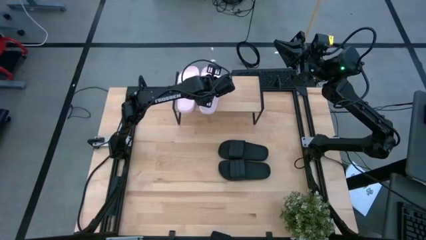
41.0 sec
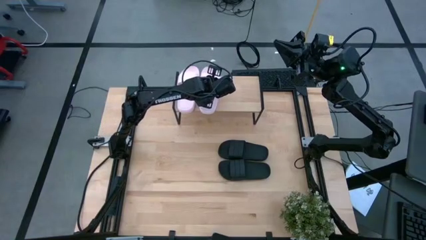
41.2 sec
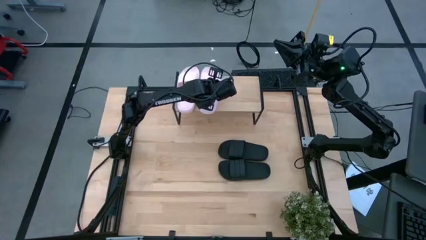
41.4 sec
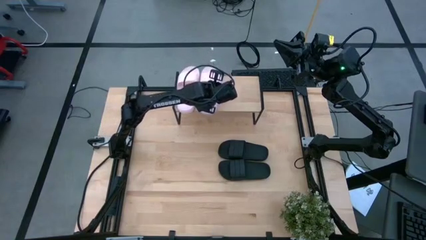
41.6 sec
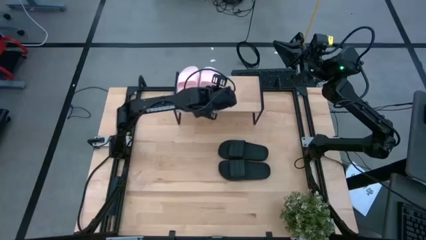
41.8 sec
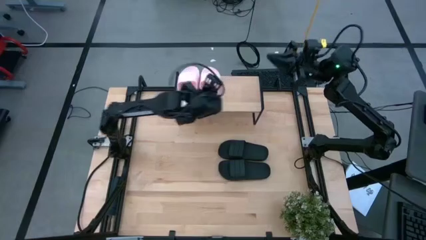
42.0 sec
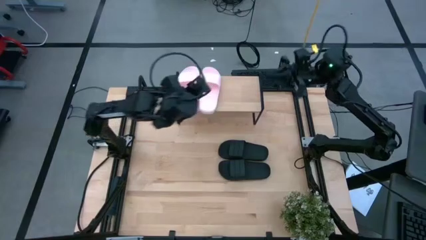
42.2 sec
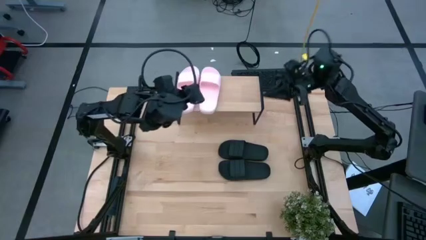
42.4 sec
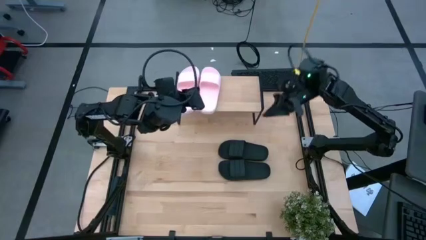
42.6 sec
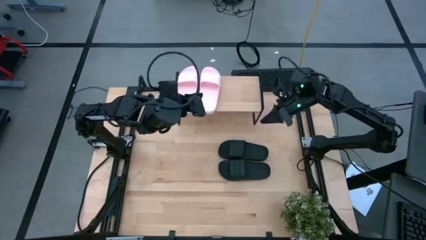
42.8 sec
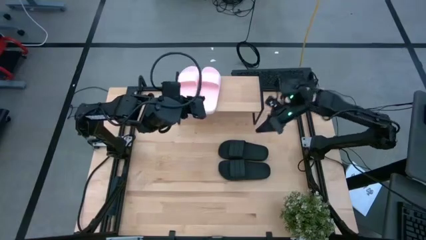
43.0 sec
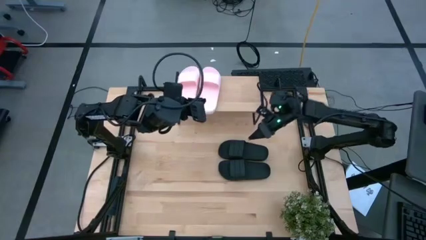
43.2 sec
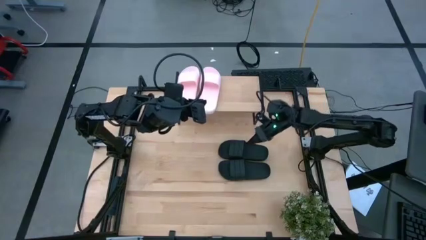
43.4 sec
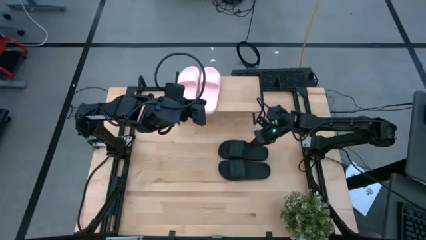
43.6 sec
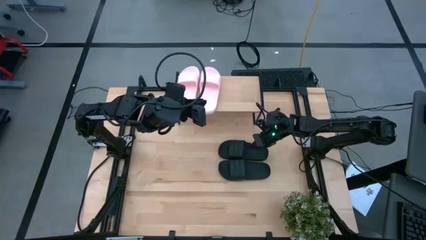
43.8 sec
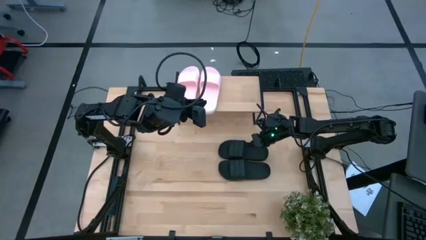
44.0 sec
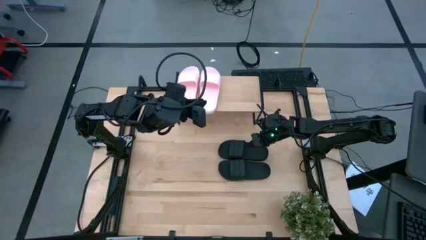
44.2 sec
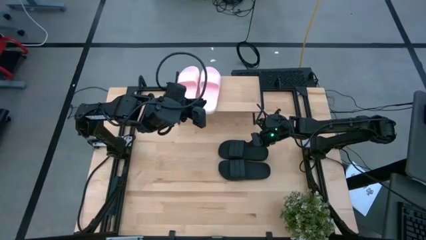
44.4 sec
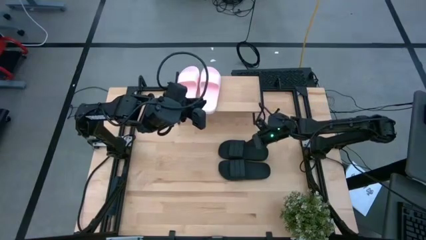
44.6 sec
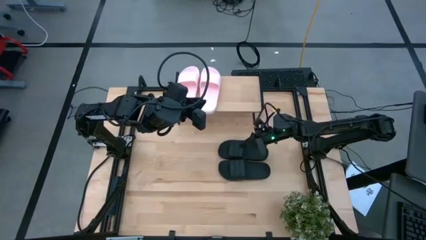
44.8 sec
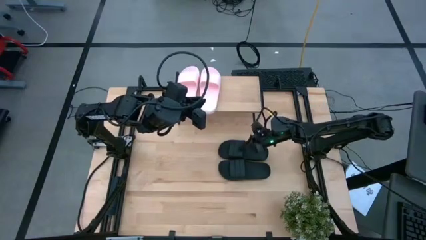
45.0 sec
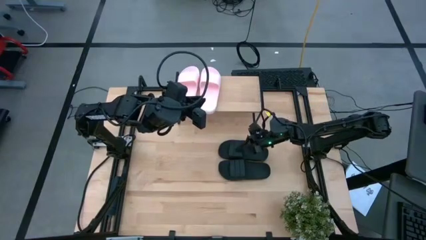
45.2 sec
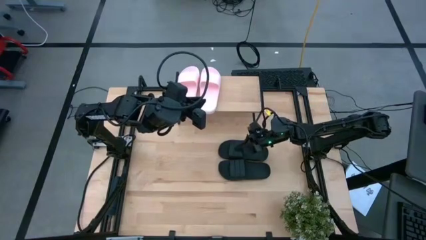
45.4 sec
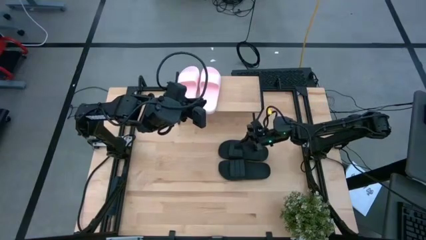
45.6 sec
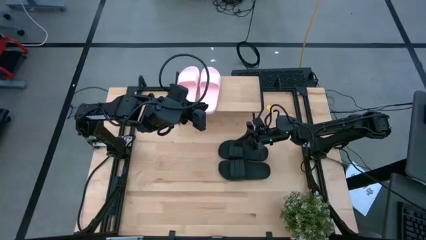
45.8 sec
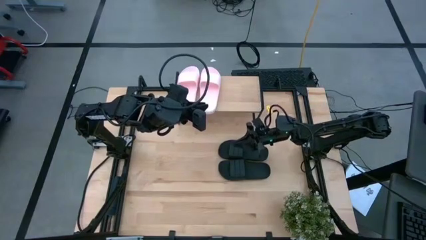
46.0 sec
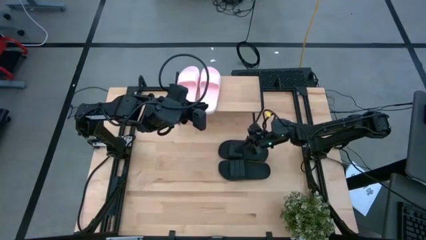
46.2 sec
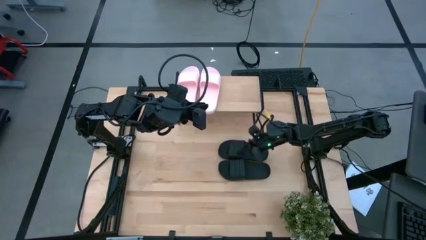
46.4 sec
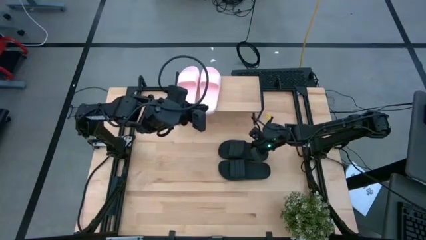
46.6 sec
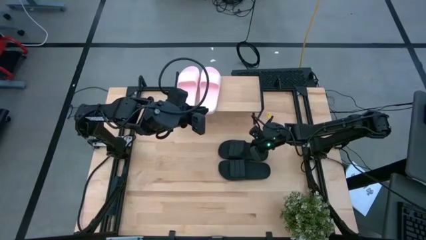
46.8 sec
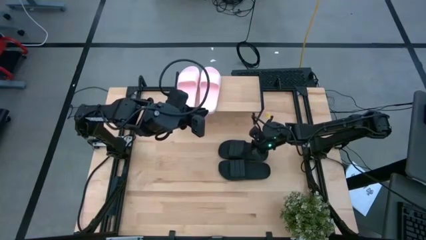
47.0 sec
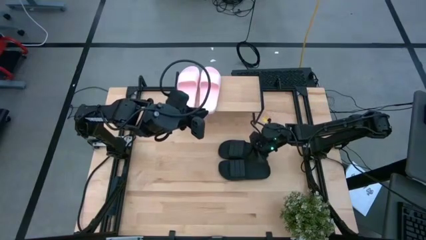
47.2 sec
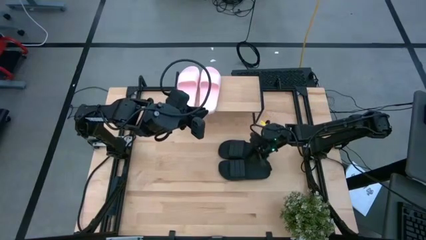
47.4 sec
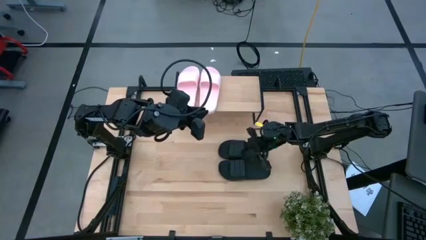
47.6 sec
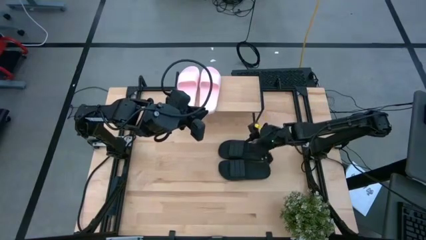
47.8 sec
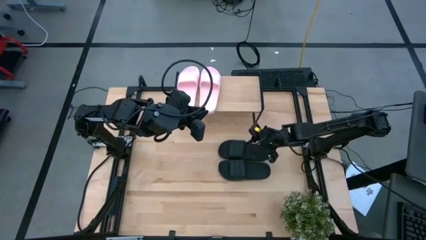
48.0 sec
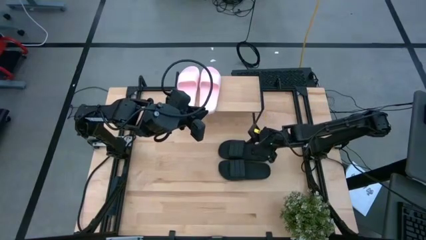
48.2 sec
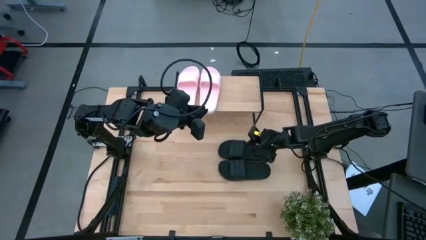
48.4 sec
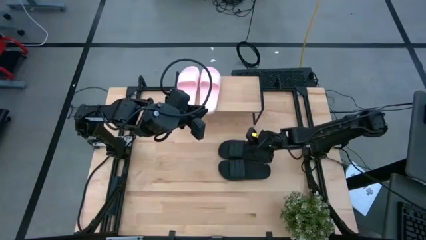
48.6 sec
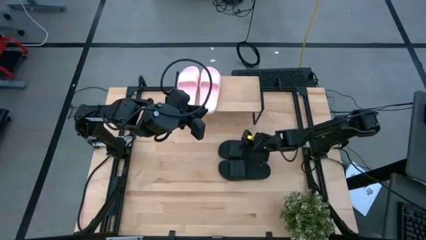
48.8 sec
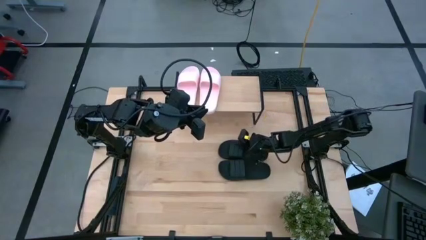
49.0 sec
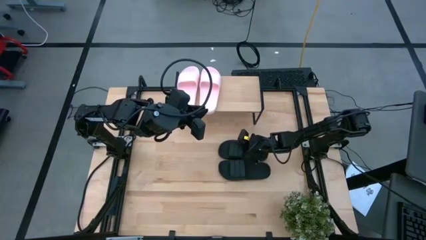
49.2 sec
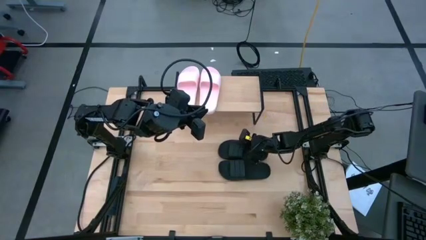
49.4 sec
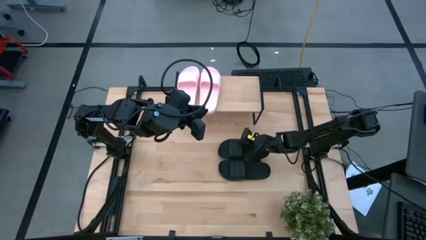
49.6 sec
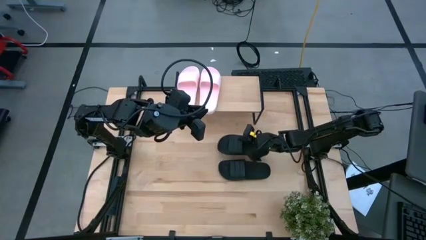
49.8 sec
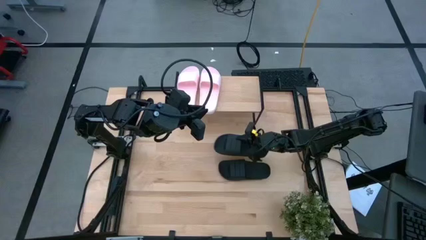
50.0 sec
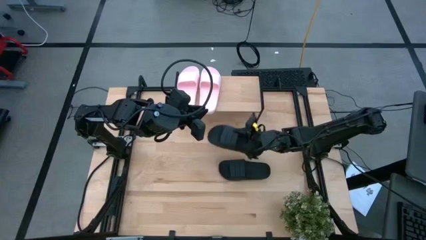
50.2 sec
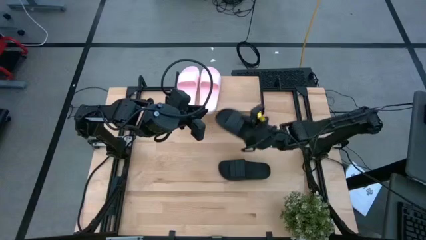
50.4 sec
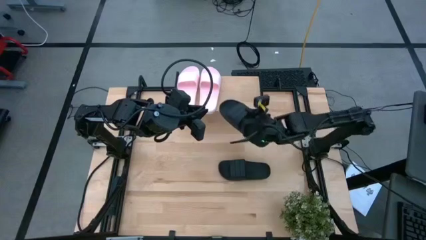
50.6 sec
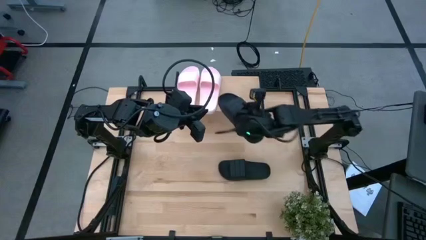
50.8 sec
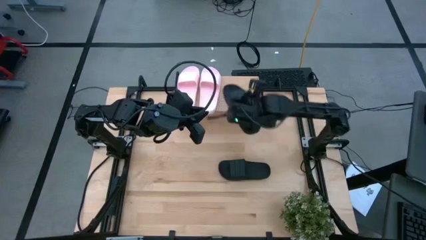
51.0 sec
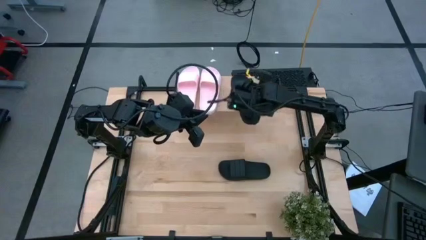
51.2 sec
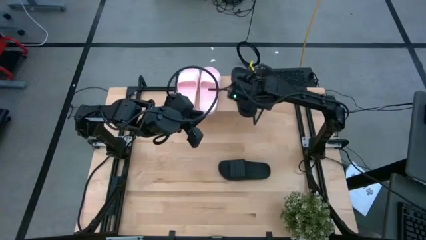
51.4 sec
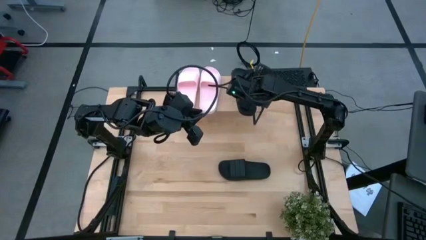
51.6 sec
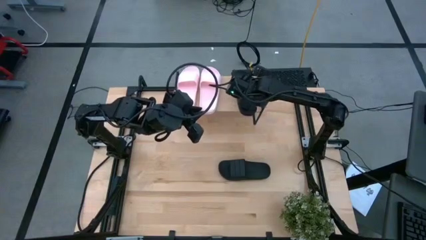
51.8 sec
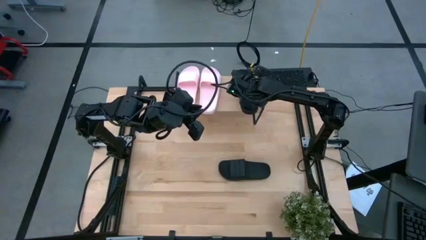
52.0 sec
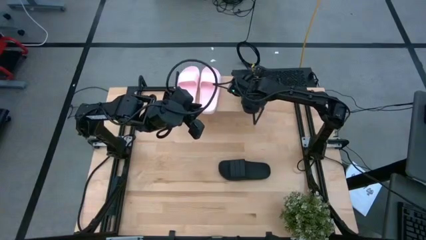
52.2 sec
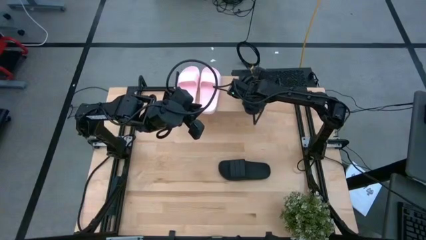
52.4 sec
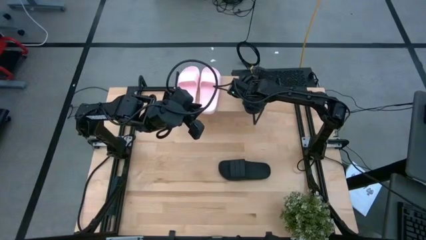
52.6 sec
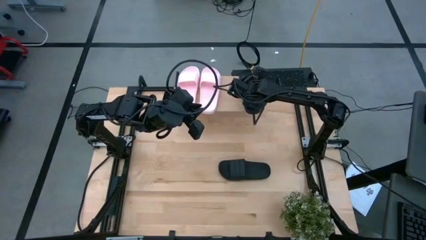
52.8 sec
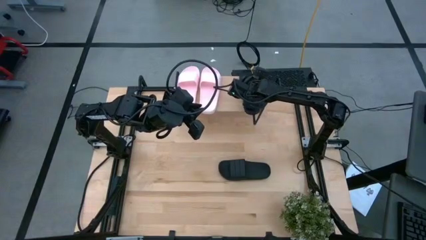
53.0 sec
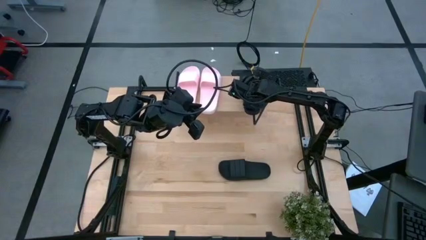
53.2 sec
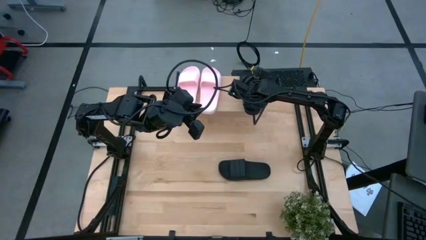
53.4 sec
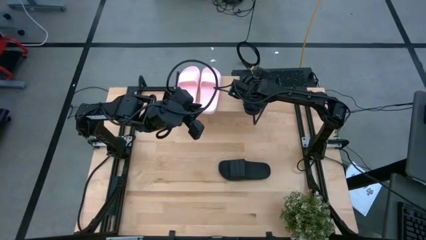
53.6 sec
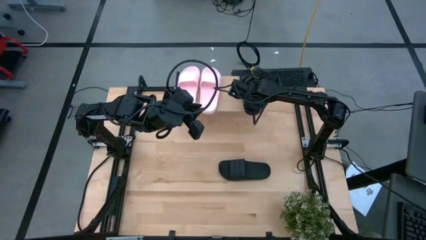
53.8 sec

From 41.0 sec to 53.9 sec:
Task: Pick and place slides into the shelf
Put the top black slides on the shelf

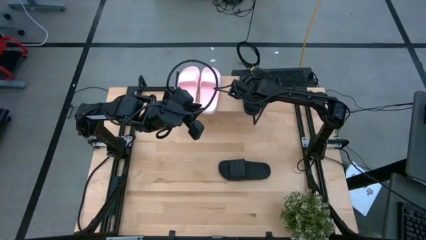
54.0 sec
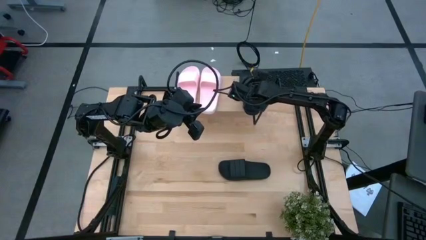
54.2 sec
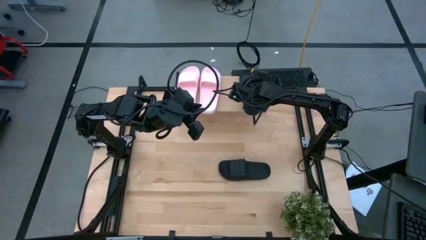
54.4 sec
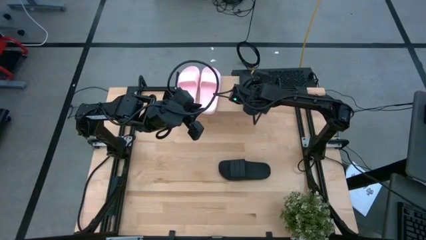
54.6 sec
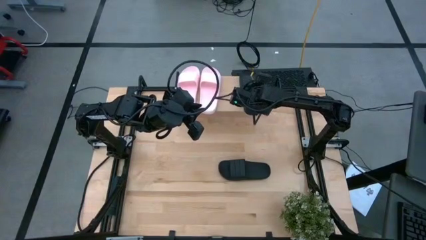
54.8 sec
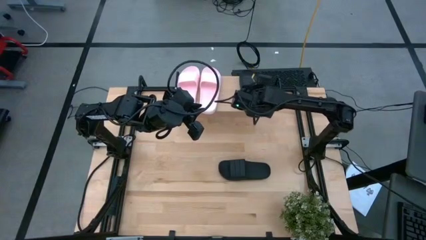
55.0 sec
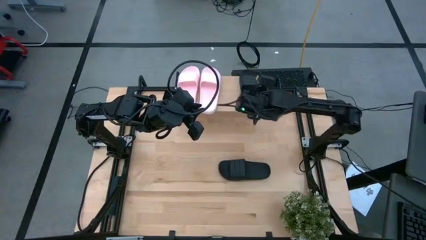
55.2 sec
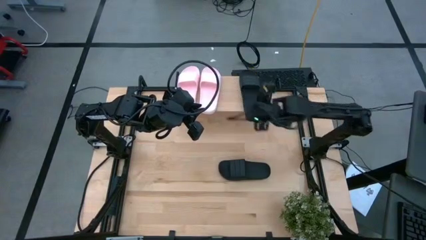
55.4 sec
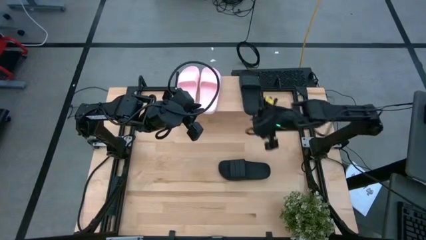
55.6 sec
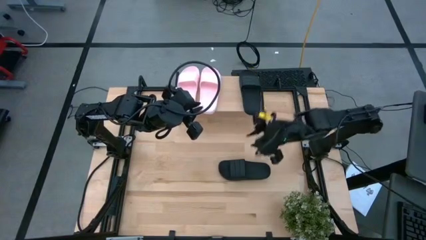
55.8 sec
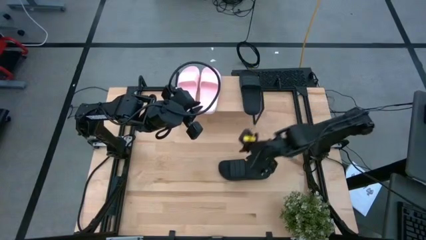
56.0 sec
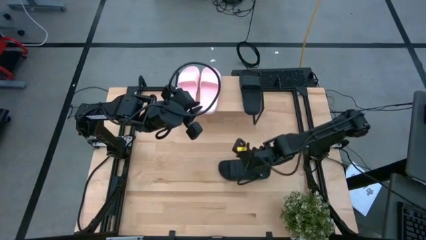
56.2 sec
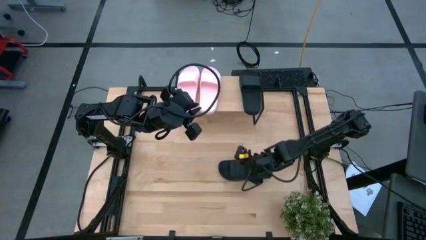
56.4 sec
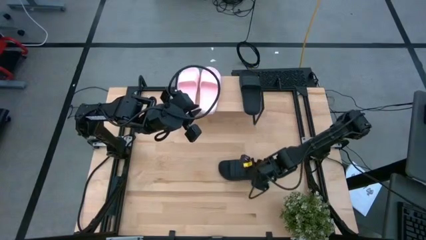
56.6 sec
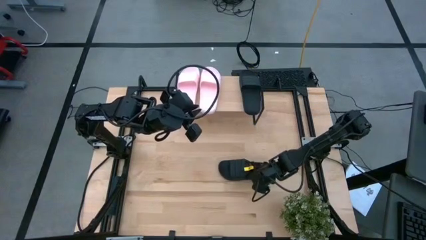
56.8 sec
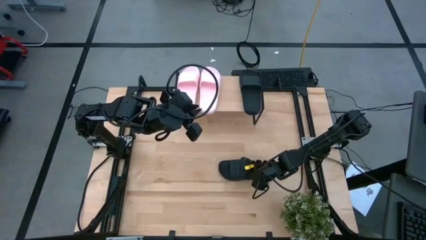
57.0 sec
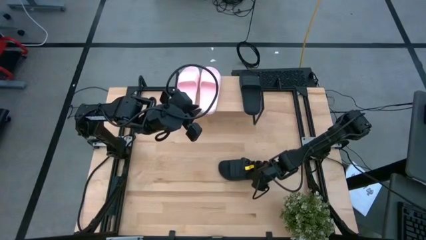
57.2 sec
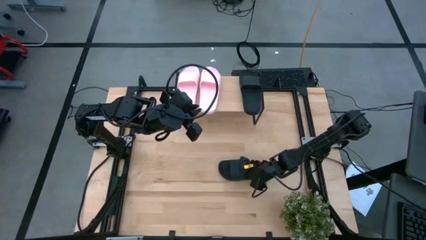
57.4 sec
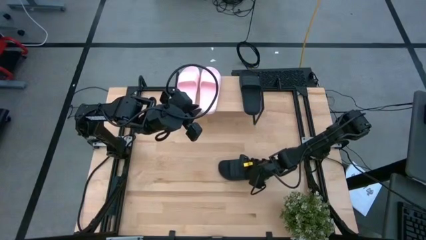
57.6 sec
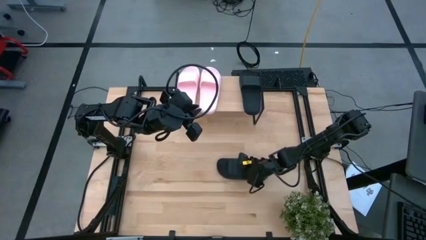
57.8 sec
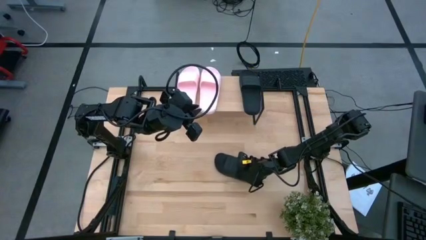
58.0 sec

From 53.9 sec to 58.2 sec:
Put the black slides on the shelf
